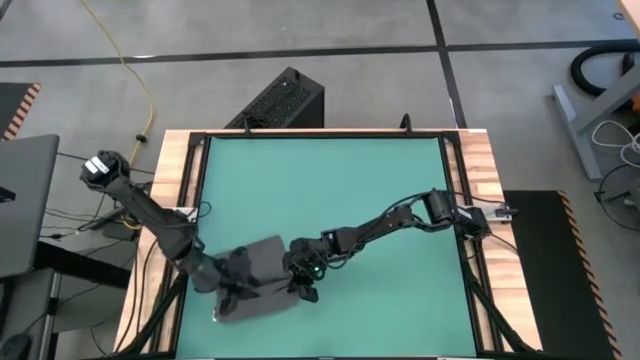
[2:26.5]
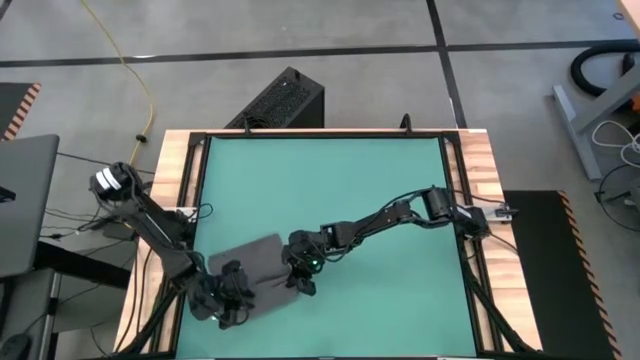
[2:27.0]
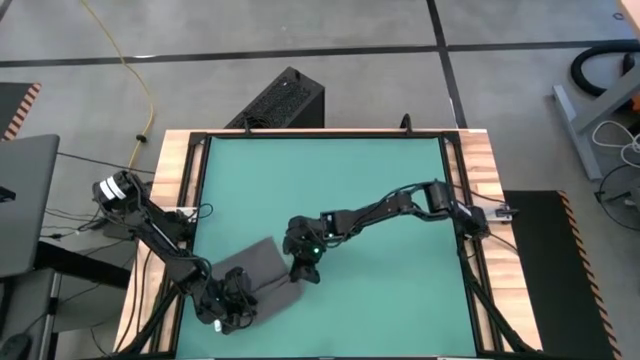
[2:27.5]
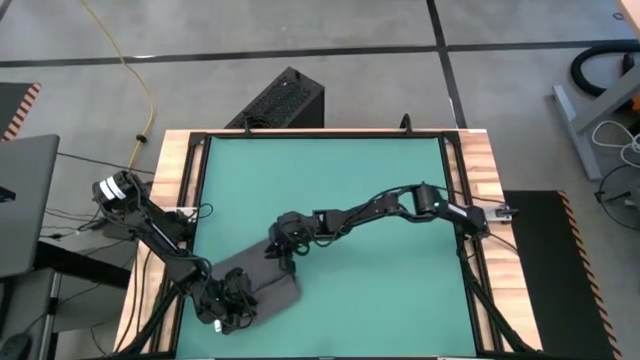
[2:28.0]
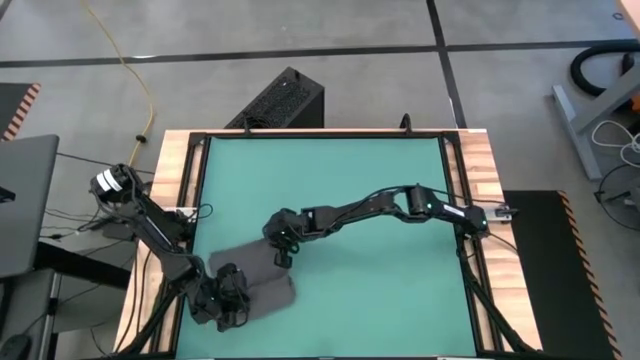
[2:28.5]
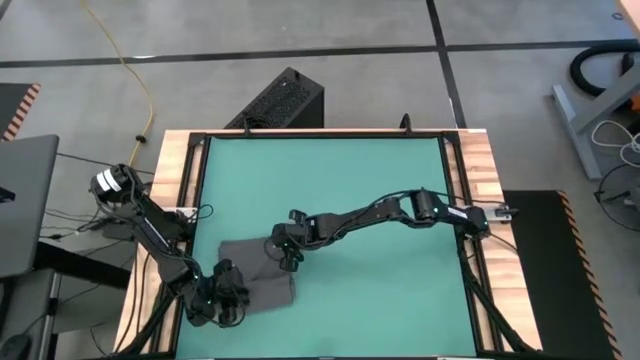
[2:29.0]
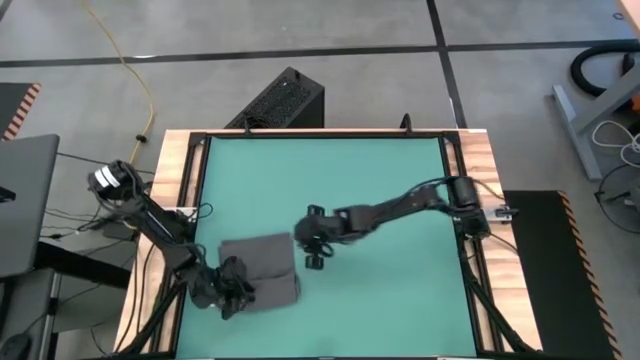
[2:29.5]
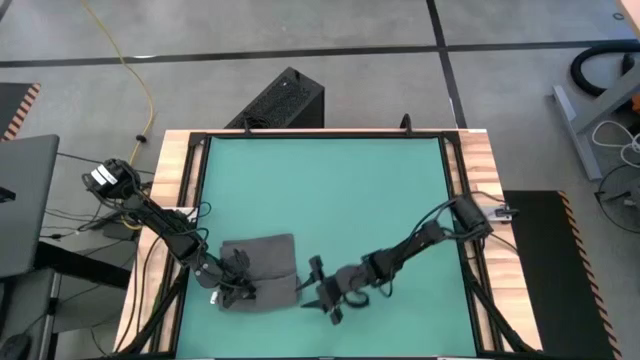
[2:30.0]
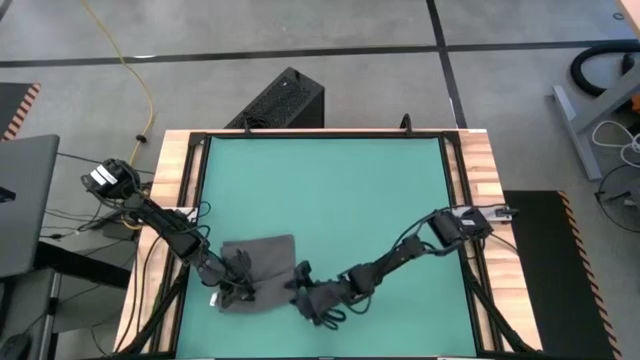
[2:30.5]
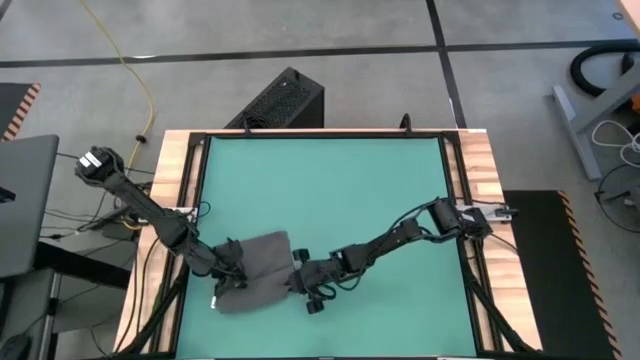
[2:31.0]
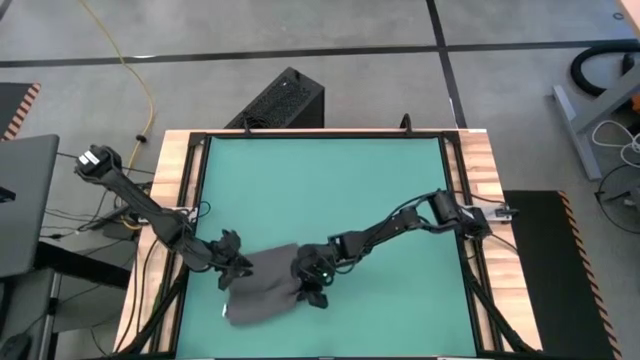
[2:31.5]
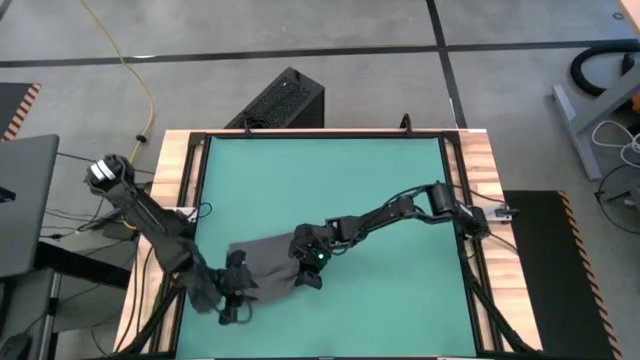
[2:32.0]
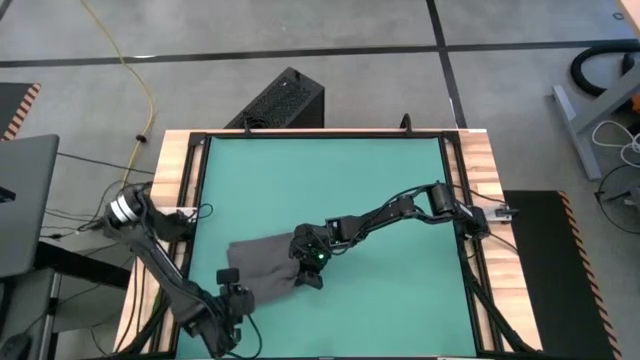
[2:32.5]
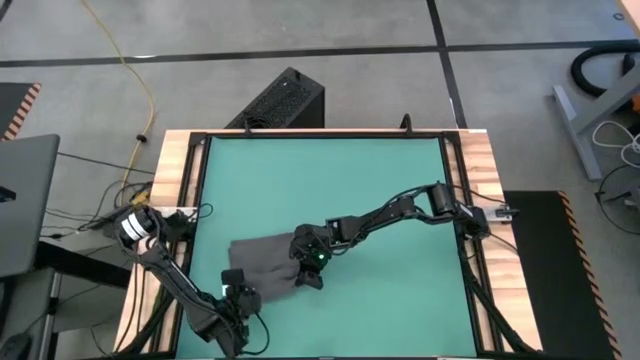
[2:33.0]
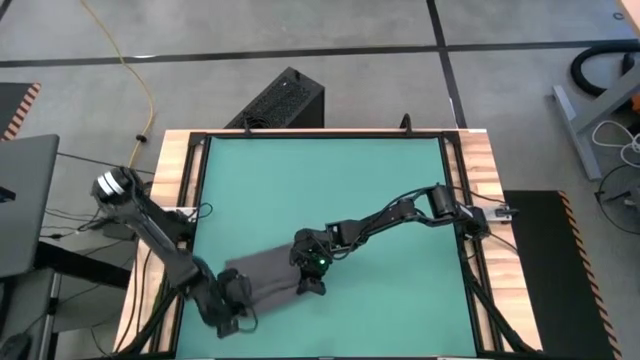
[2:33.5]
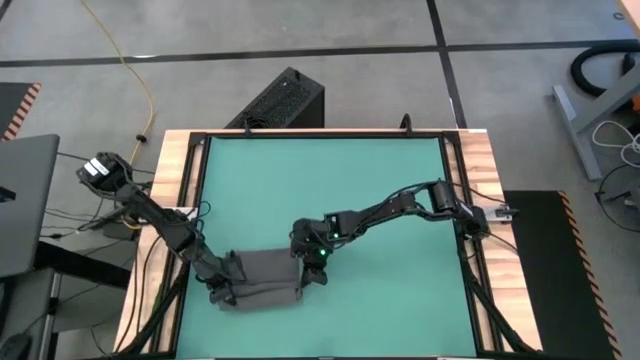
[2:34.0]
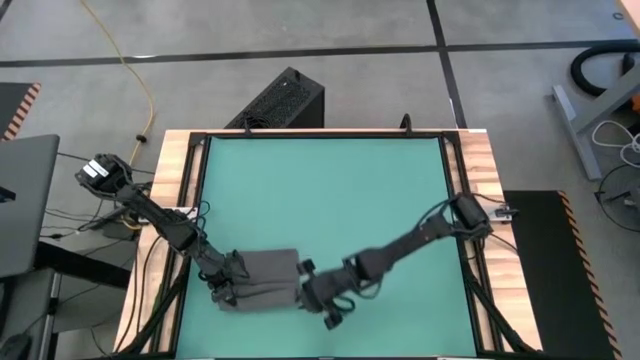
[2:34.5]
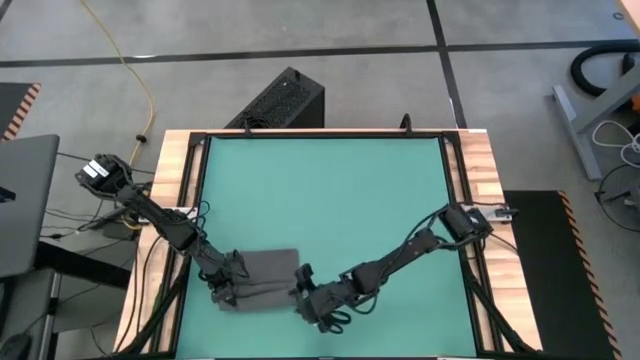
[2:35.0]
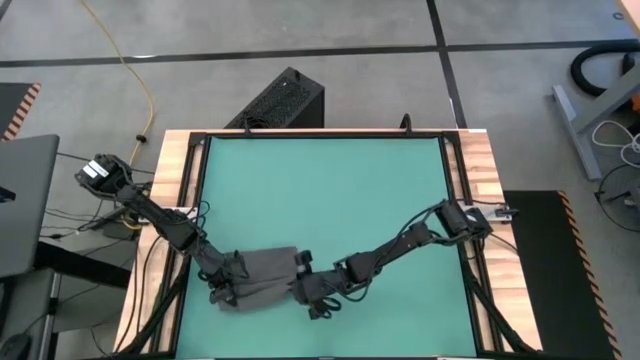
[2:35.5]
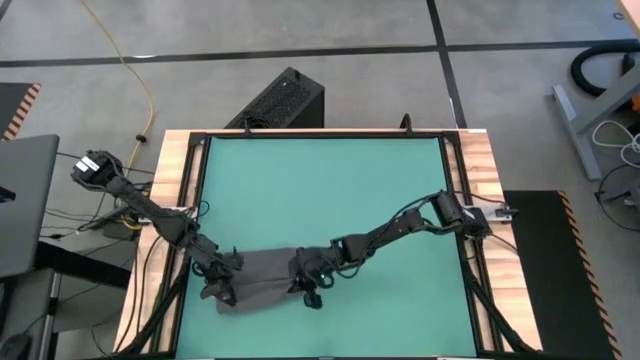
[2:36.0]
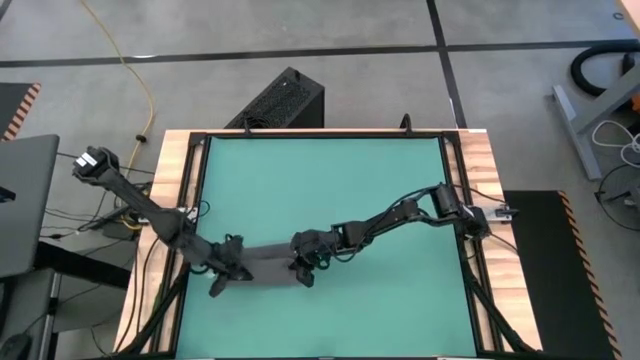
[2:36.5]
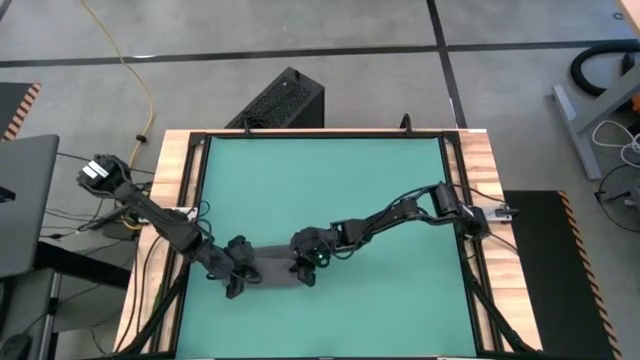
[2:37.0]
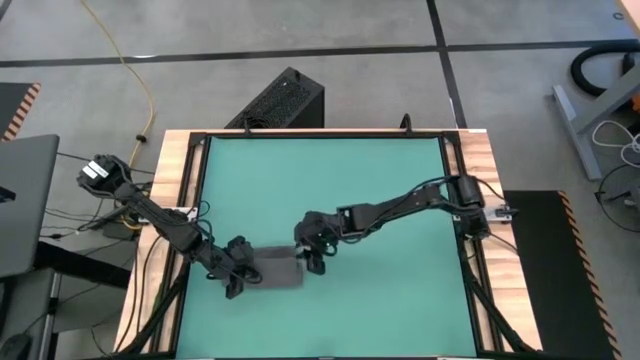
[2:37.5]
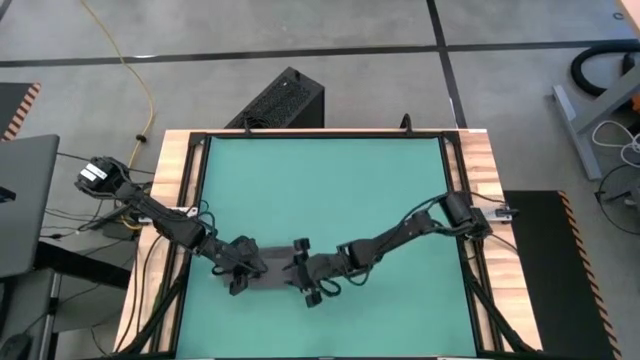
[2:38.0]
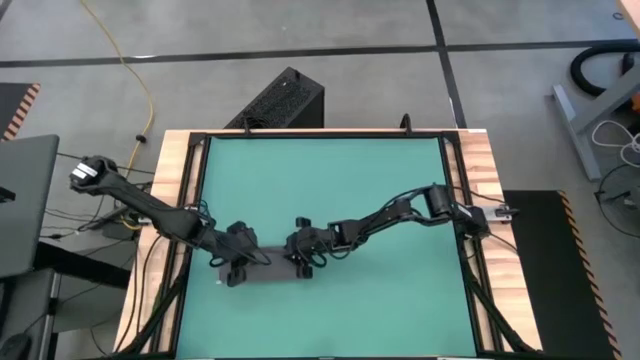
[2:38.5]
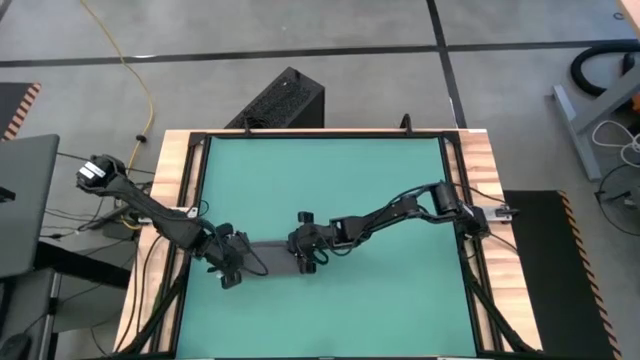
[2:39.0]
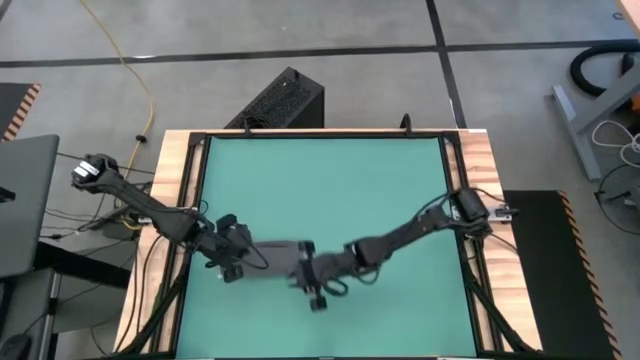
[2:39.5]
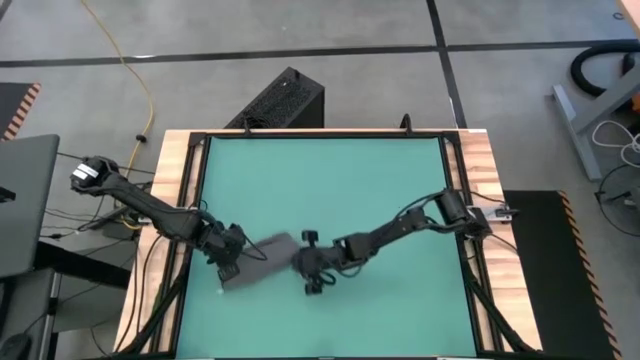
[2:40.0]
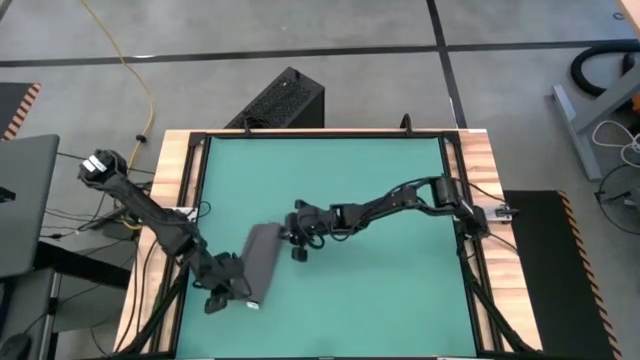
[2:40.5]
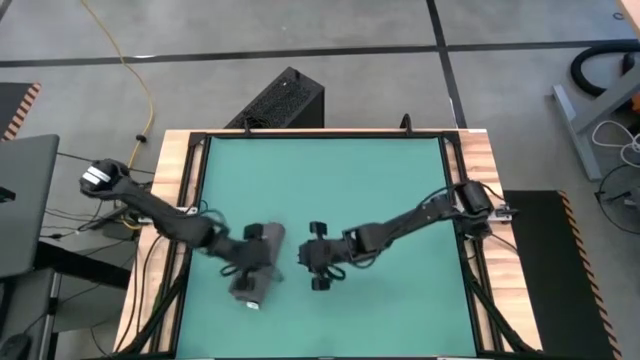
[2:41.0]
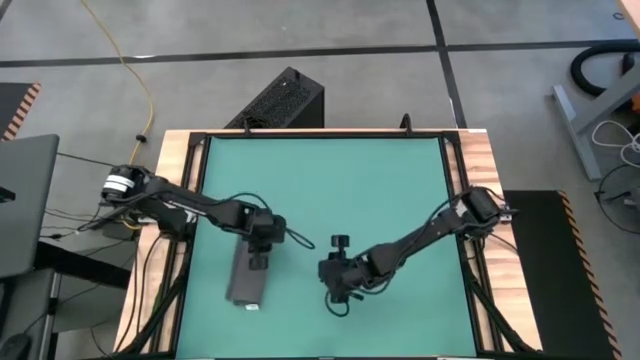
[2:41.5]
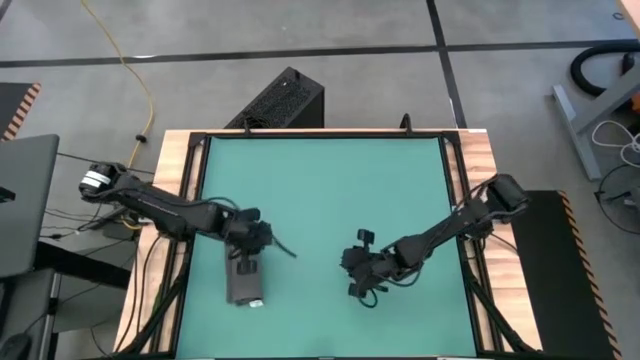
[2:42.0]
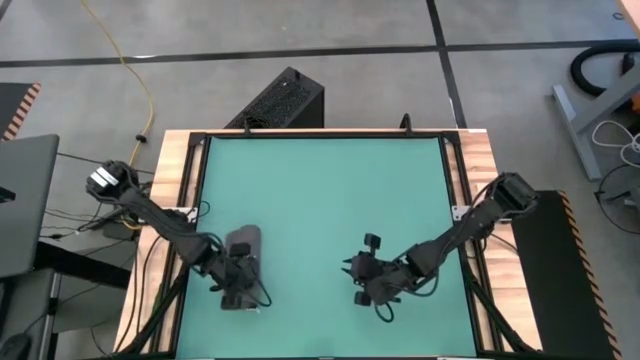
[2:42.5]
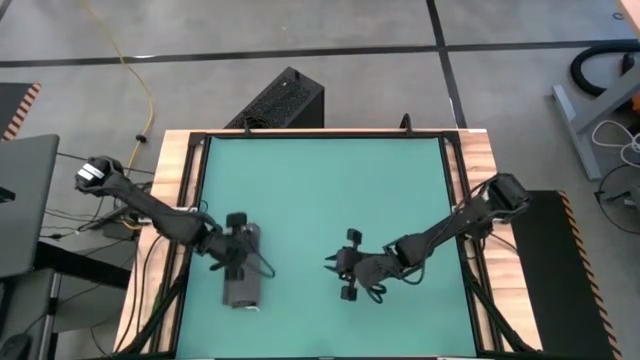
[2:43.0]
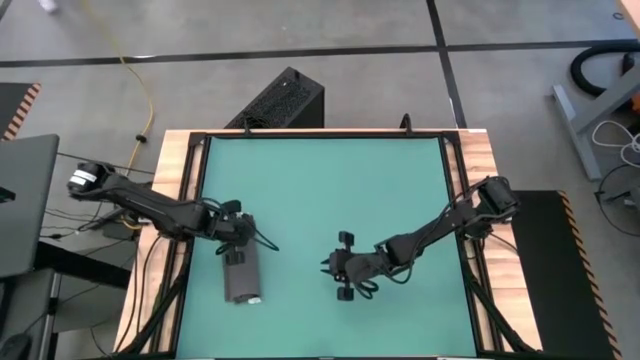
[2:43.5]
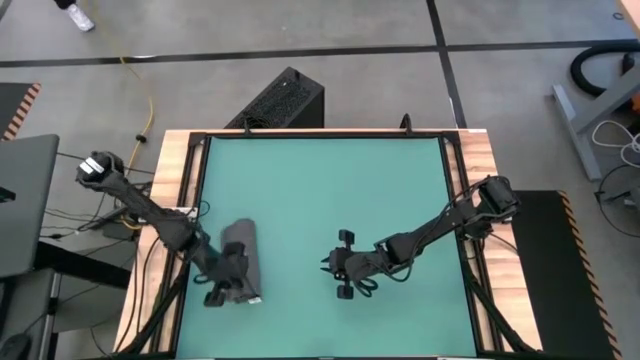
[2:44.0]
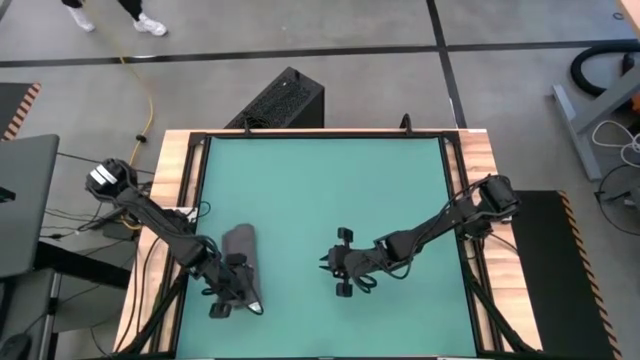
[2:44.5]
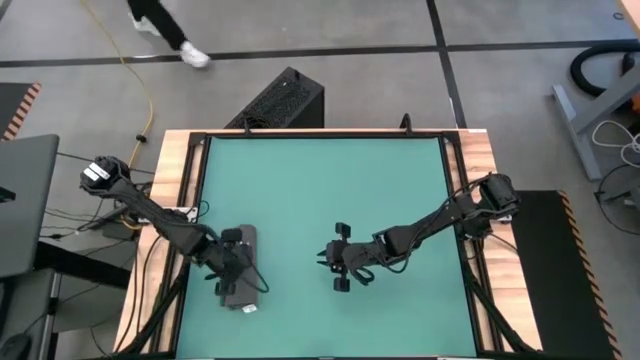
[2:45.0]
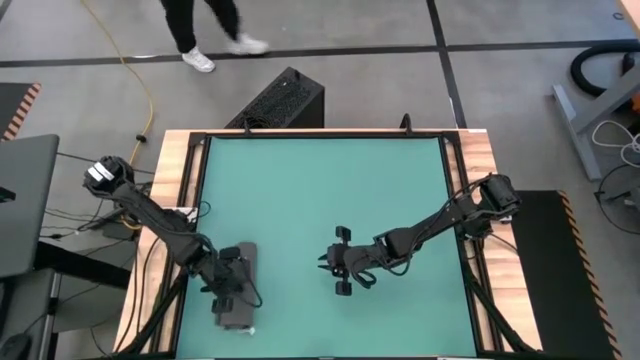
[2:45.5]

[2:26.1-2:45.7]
Task: Roll towel
Roll the gray towel

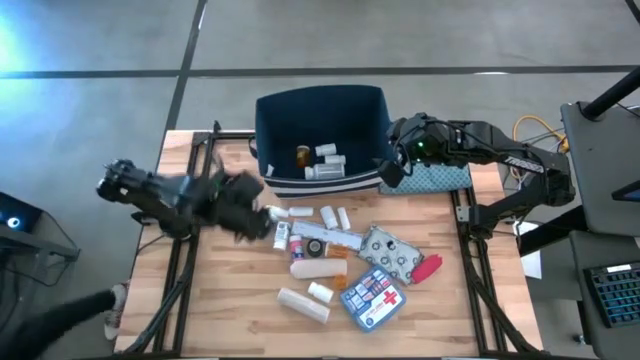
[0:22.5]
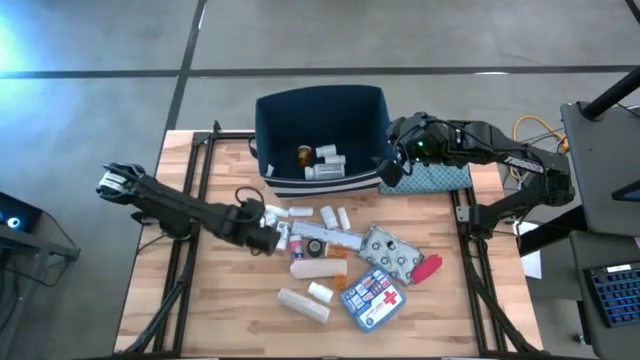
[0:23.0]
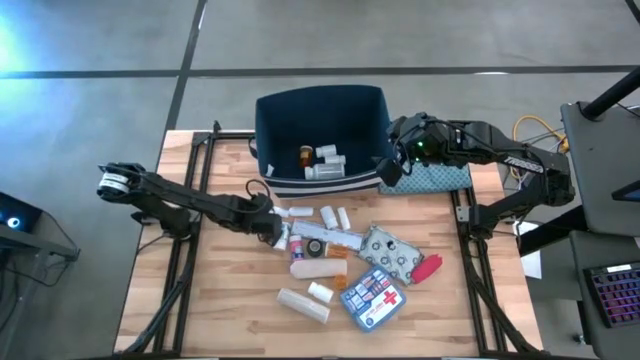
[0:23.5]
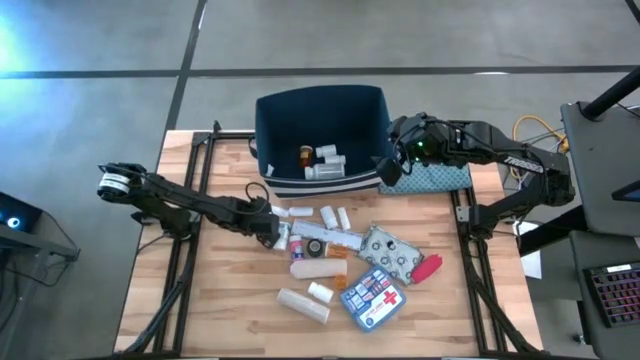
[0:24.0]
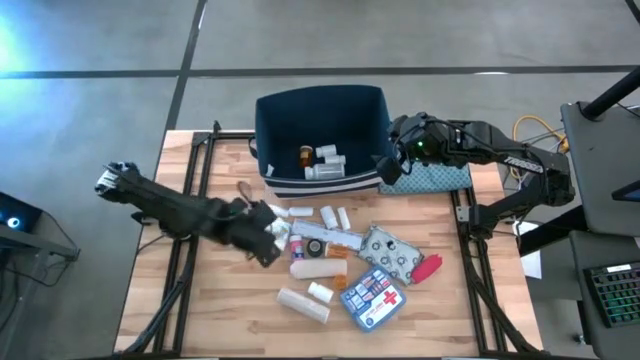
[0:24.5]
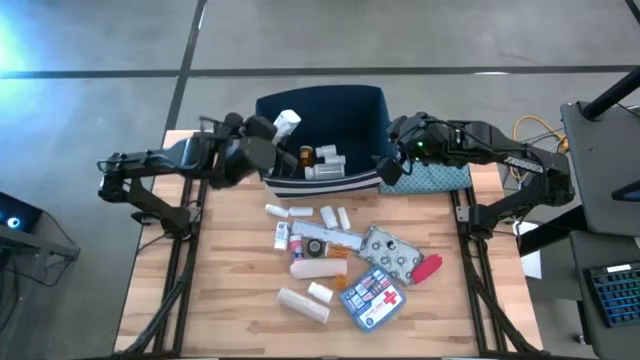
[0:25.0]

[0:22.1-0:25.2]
Task: Pick & place medical supplies in basket/bin
Put the white medicine bottle into the blue bin
